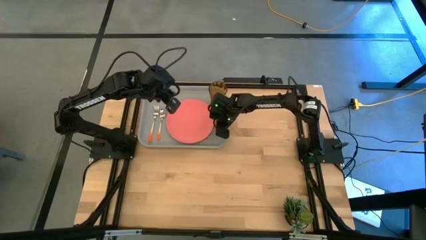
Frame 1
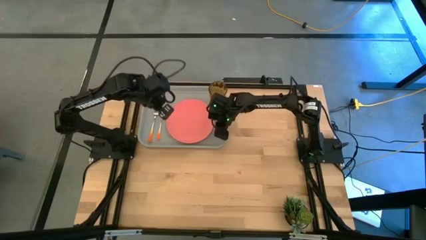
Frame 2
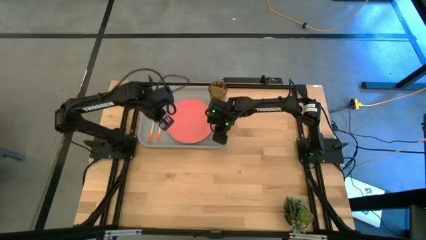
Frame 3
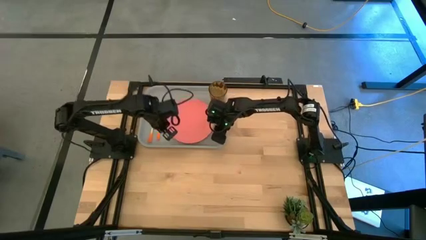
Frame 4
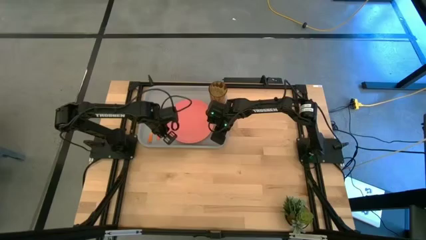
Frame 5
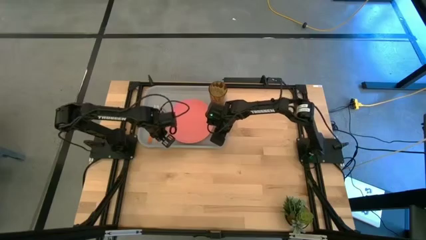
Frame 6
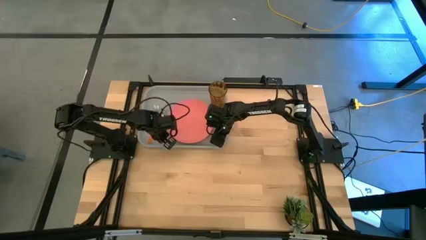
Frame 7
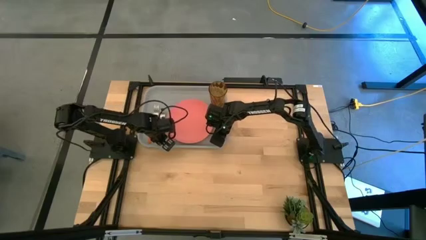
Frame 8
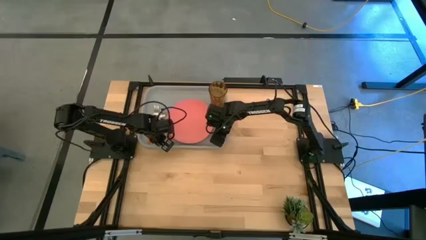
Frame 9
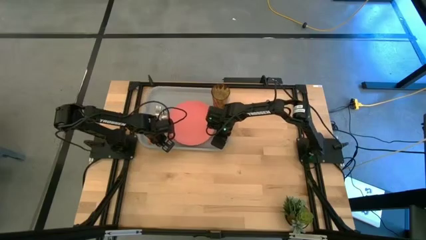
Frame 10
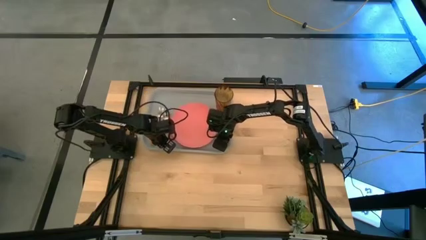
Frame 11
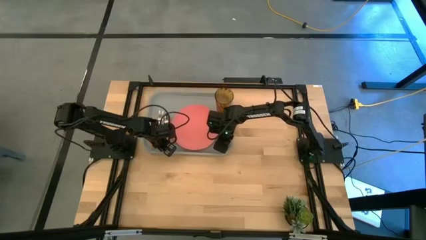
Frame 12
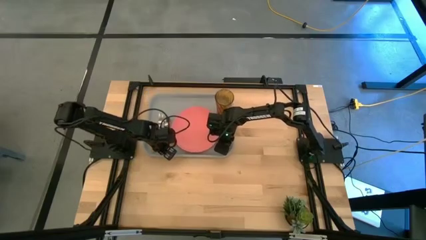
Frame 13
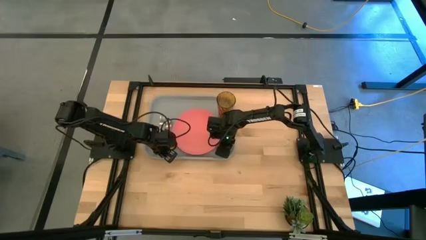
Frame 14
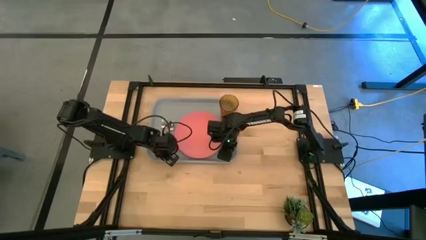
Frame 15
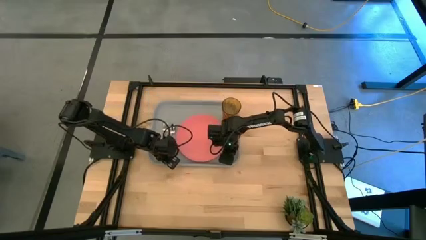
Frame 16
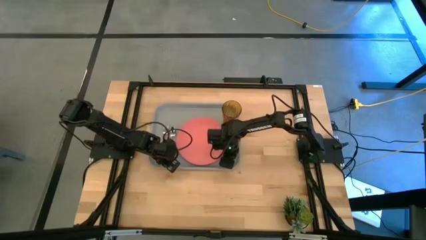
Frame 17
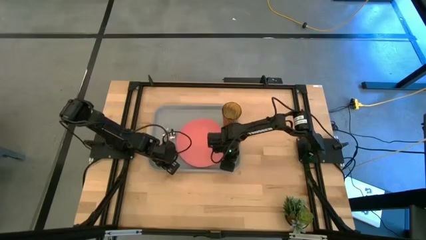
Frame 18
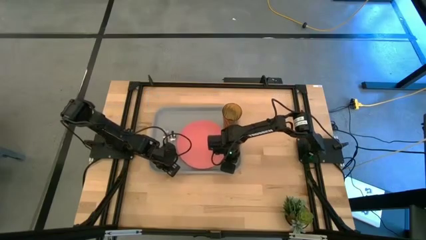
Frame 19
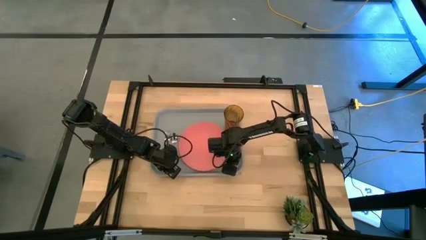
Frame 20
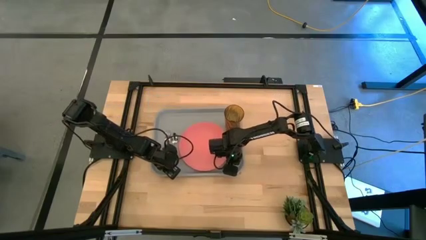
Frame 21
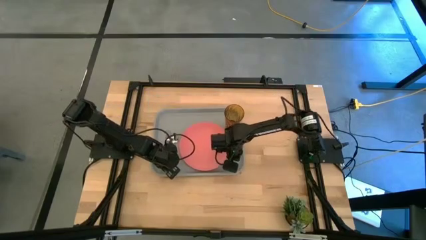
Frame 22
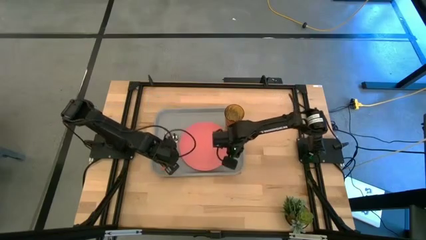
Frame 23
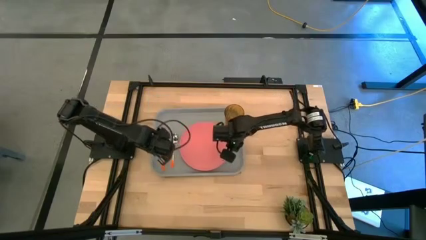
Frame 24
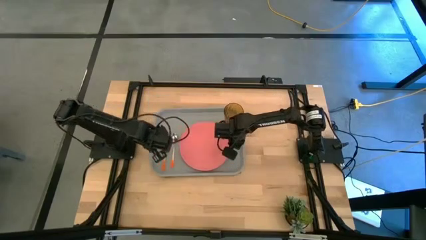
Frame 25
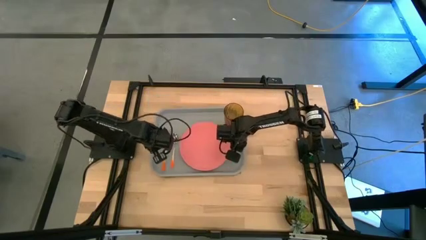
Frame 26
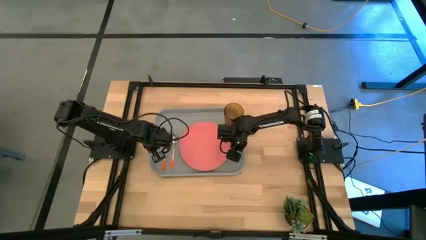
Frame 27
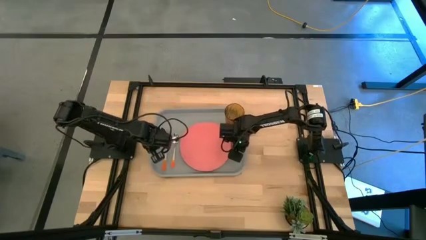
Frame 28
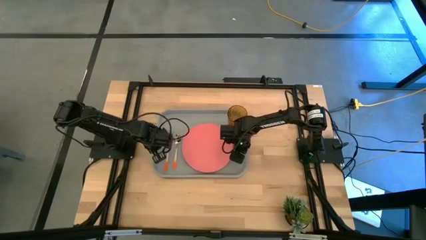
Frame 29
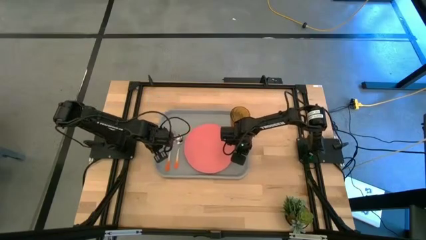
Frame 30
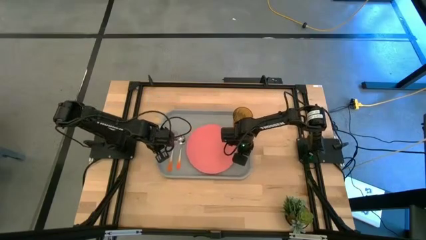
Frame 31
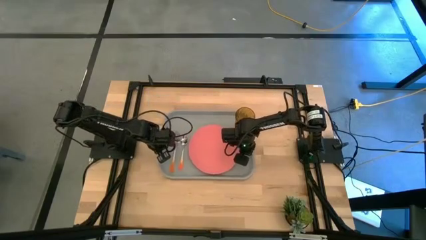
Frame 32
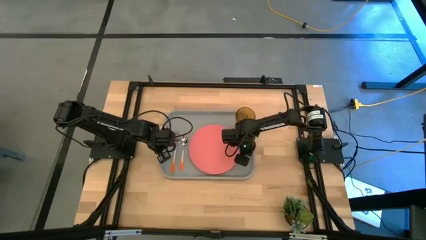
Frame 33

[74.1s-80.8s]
Task: Pick and place plate/cup/fork/spoon on tray
Move the tray serving tray to the center of the table

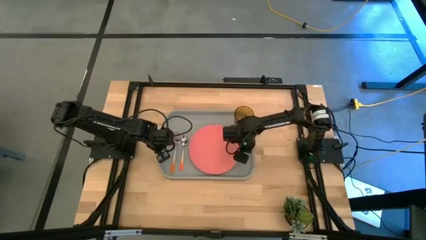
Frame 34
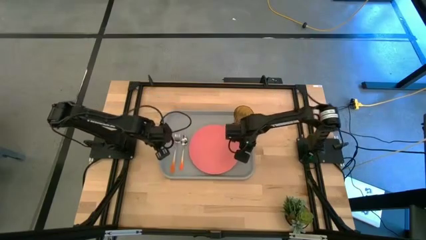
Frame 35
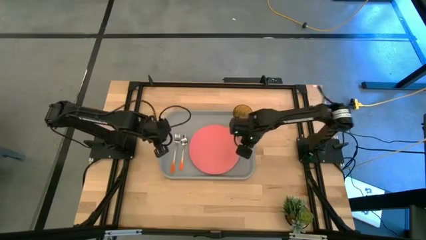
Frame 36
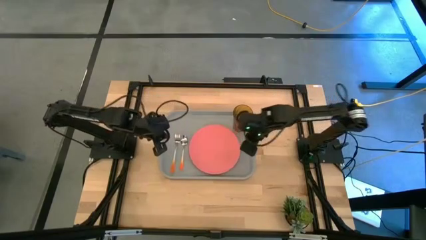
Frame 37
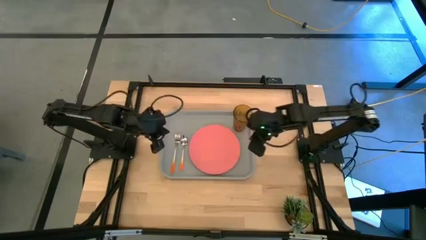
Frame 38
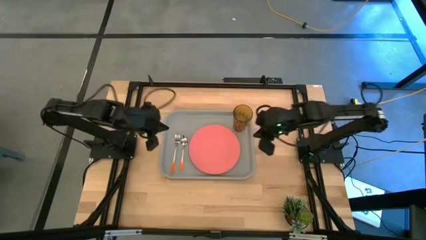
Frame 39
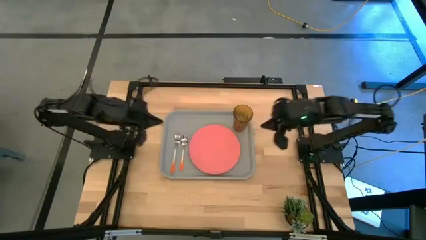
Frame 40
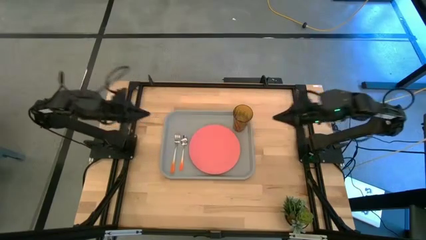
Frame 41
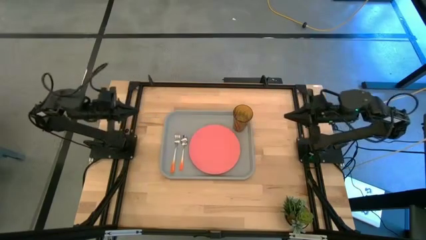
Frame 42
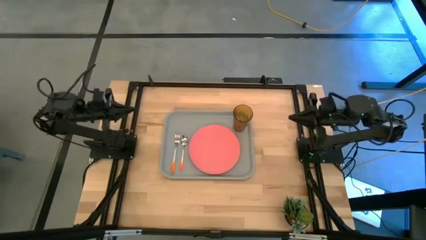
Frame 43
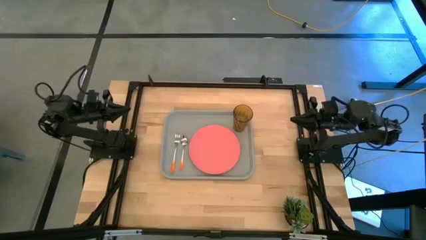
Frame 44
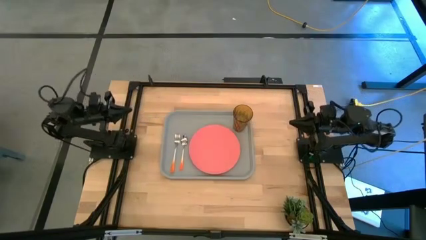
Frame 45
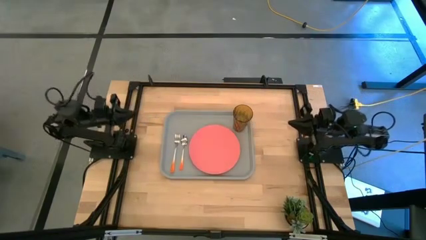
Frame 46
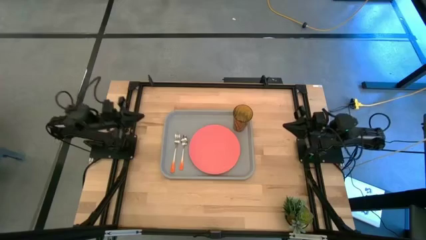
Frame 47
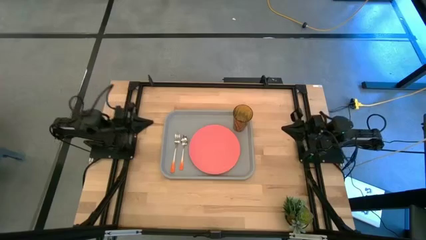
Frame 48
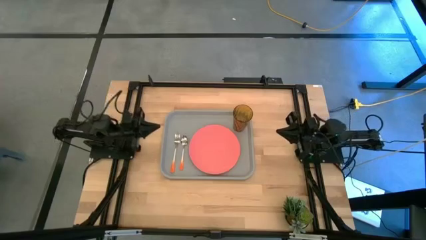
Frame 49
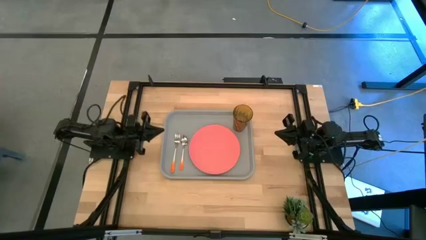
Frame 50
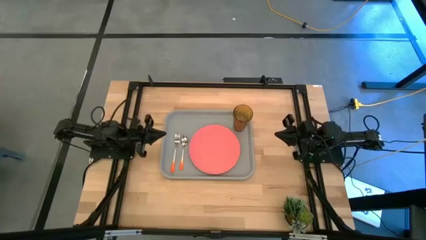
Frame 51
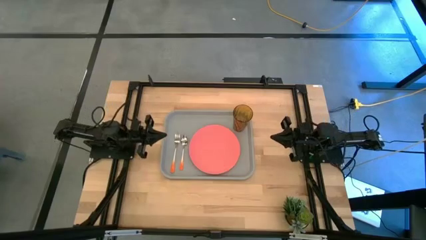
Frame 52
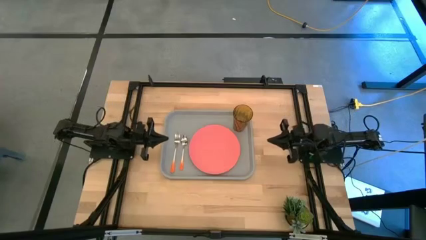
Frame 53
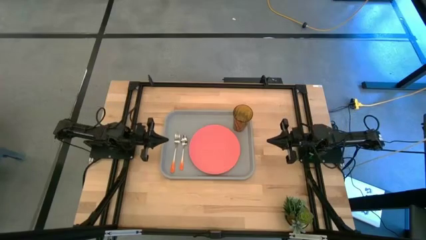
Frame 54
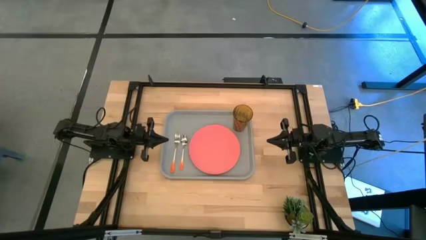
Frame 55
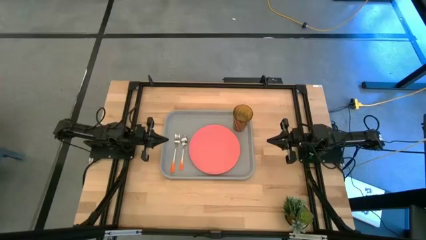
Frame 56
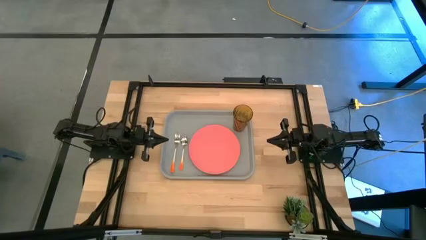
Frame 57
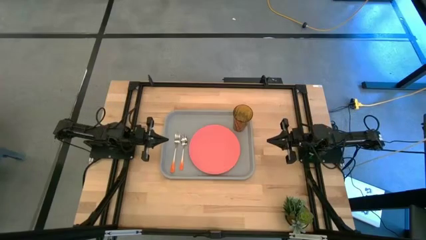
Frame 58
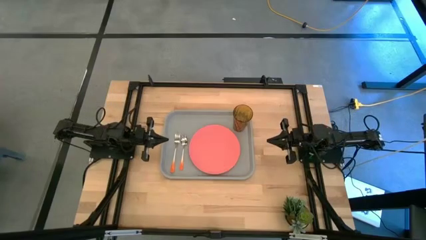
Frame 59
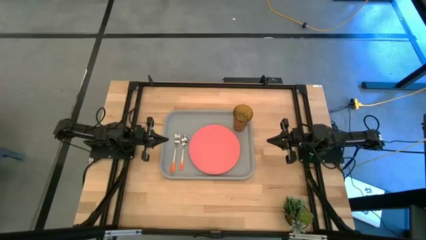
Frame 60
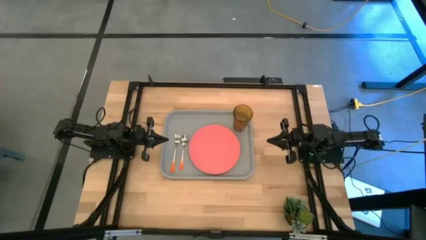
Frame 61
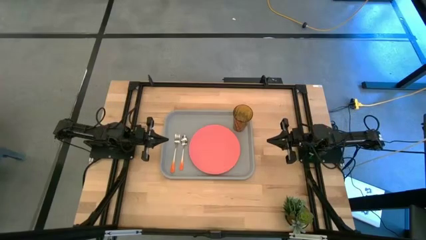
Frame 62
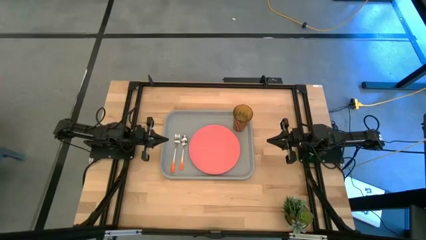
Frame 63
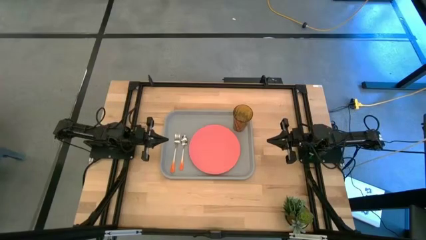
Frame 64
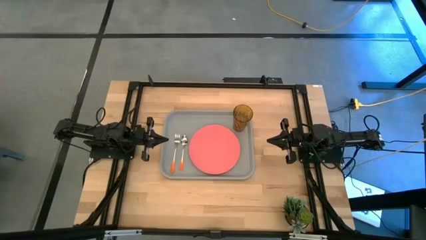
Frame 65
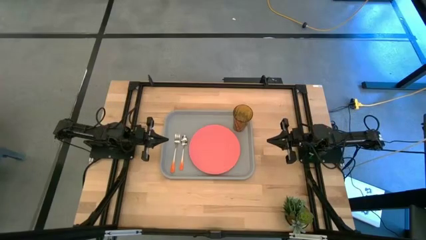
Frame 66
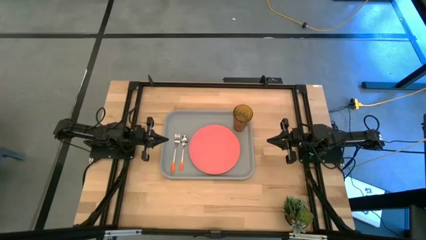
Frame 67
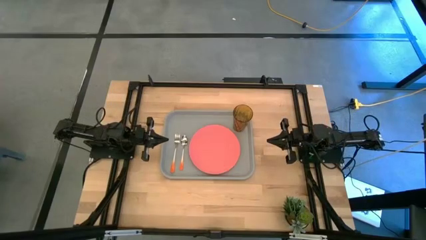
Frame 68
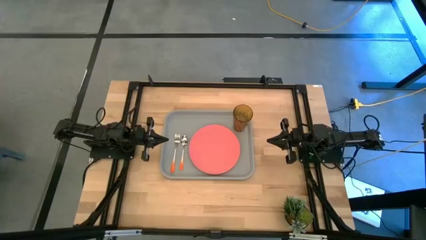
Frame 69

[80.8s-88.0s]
Return to Home Position

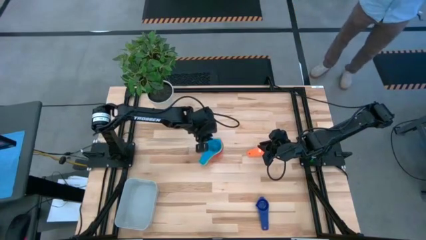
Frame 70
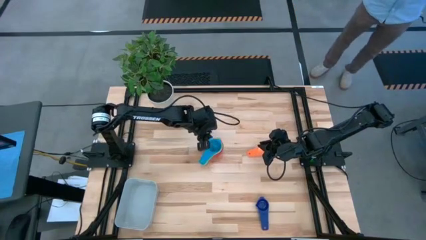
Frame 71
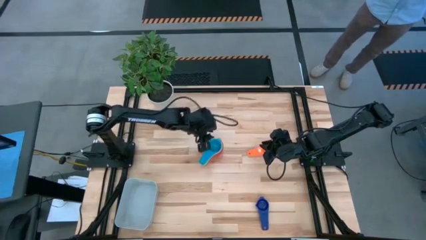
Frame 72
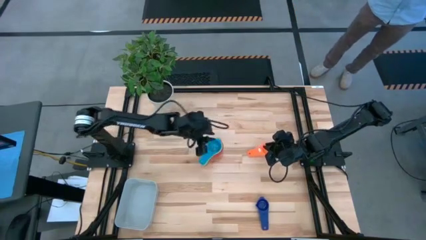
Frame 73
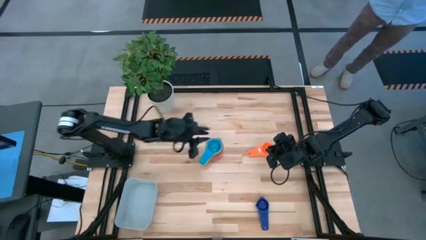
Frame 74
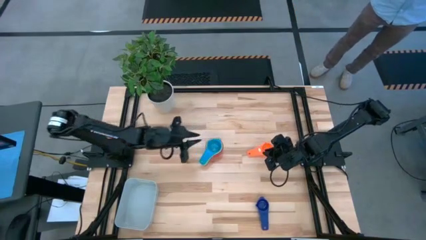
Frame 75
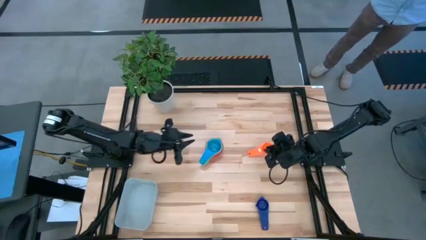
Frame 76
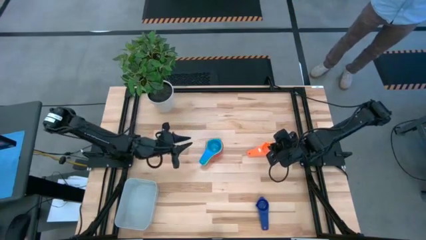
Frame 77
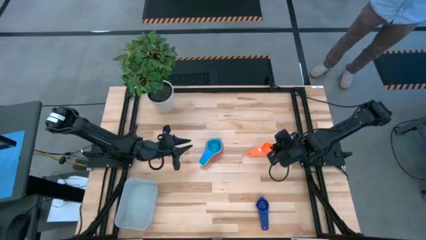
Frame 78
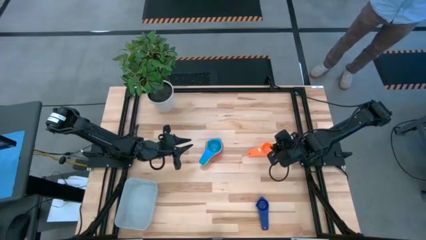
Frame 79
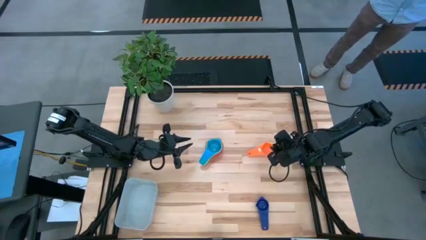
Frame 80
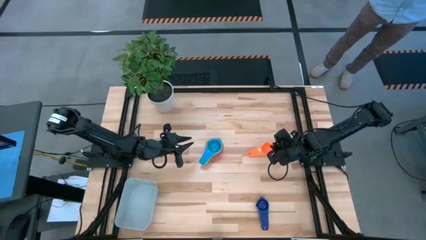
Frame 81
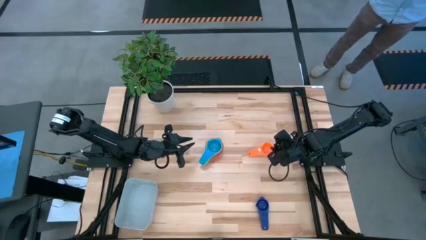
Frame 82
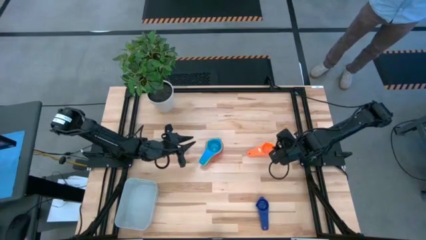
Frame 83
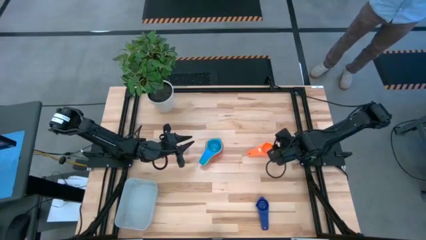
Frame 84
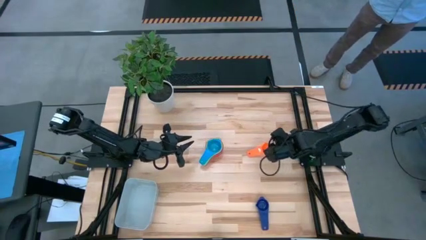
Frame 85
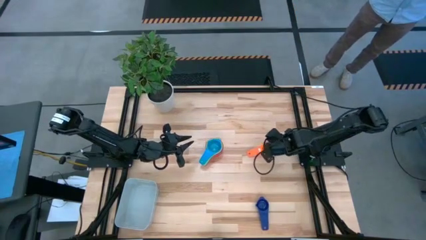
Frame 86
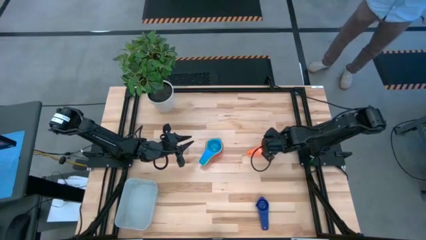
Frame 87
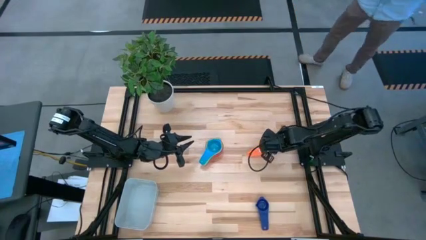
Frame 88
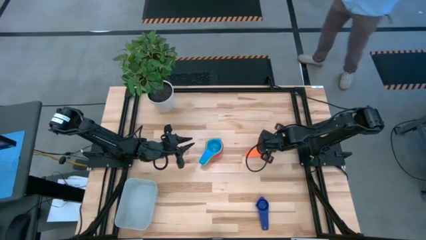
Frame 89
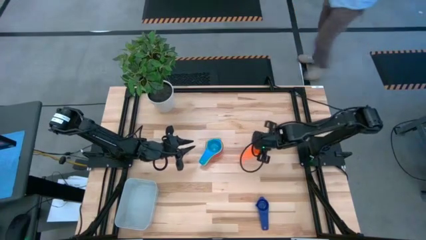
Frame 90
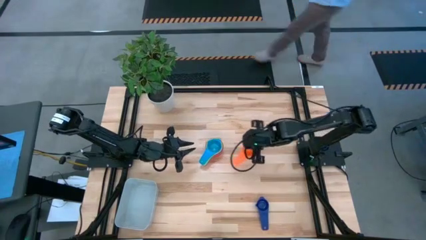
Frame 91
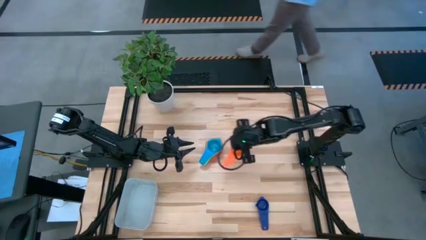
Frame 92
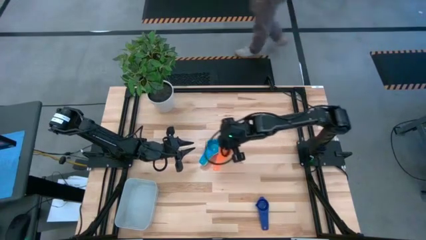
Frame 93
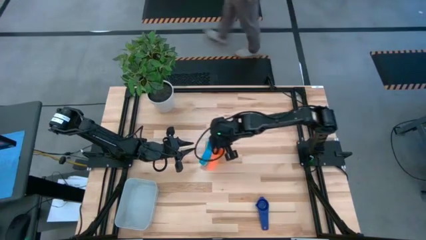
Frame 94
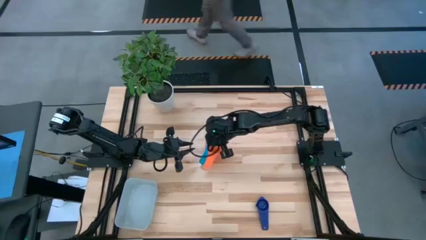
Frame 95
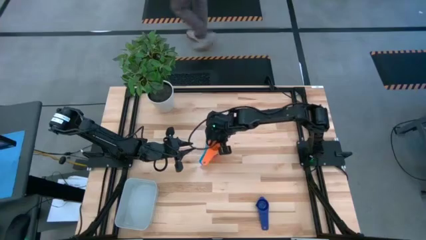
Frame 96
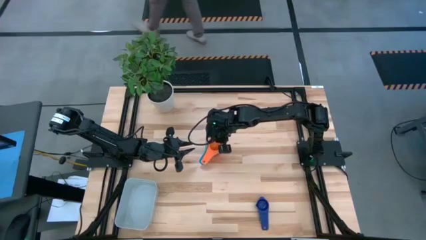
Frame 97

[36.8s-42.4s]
Task: Nest measuring cups in basket
Stack the orange measuring cup on the light blue measuring cup
